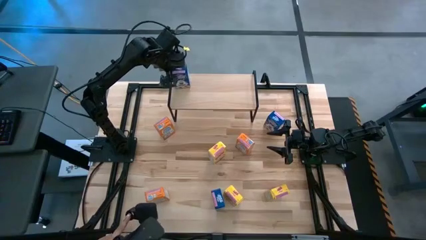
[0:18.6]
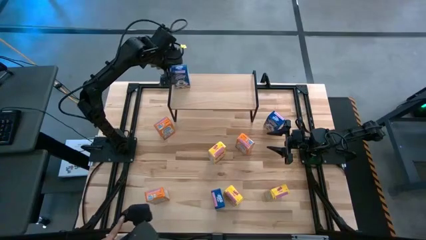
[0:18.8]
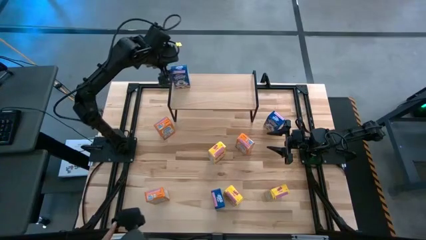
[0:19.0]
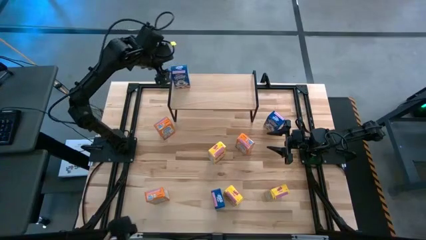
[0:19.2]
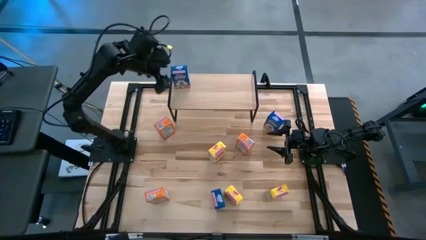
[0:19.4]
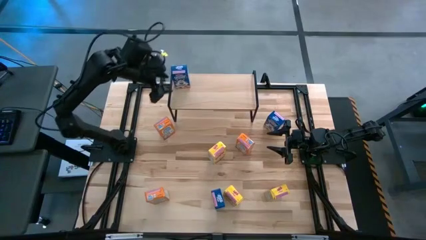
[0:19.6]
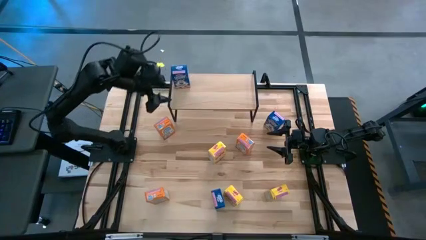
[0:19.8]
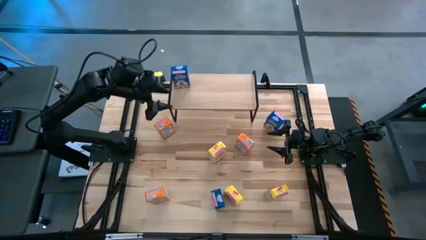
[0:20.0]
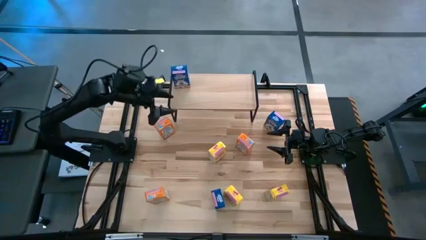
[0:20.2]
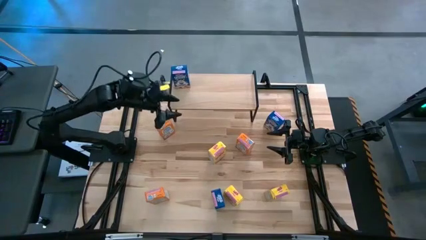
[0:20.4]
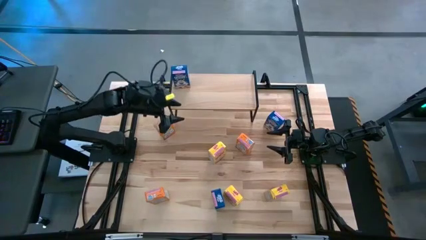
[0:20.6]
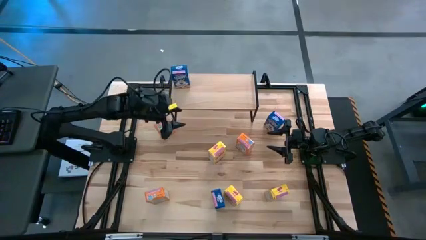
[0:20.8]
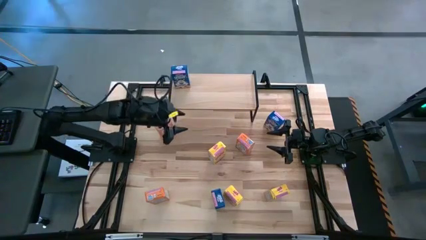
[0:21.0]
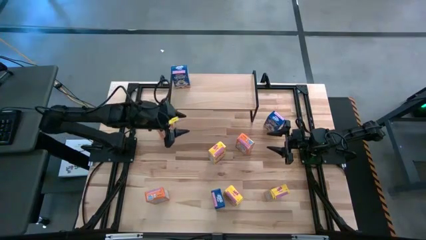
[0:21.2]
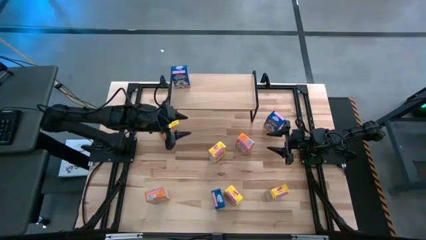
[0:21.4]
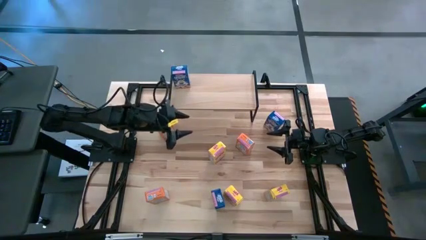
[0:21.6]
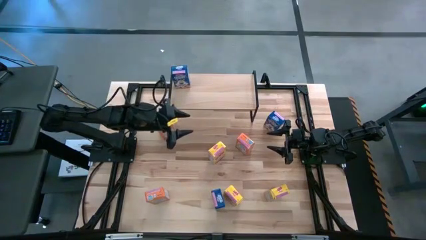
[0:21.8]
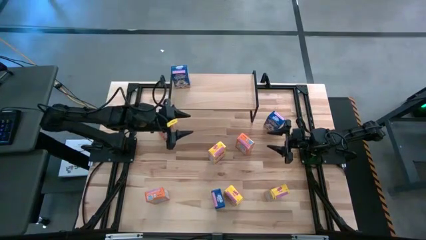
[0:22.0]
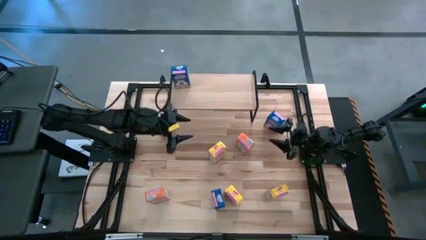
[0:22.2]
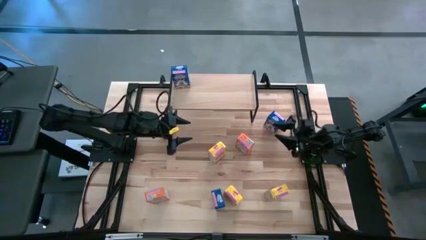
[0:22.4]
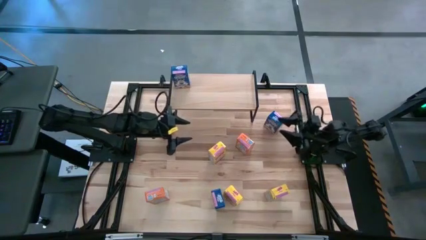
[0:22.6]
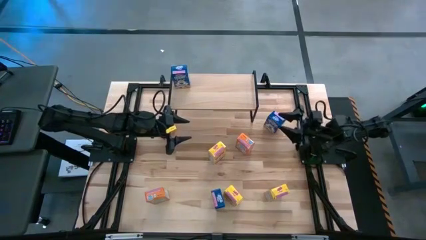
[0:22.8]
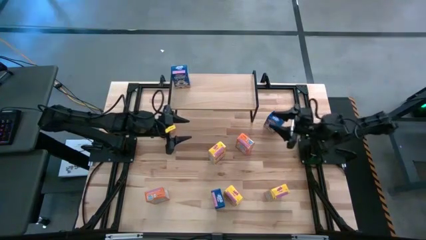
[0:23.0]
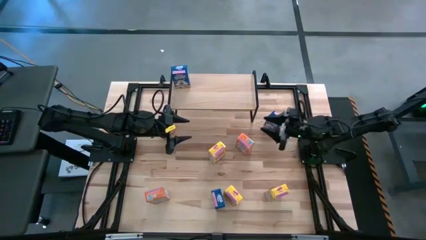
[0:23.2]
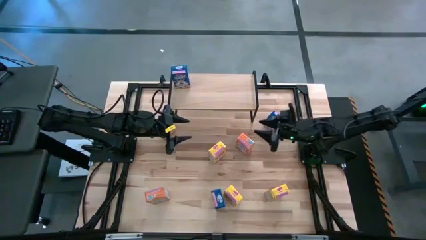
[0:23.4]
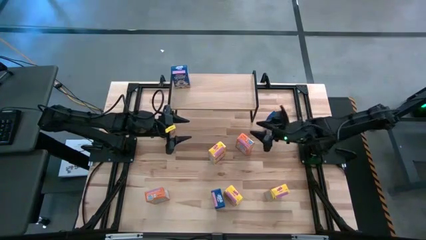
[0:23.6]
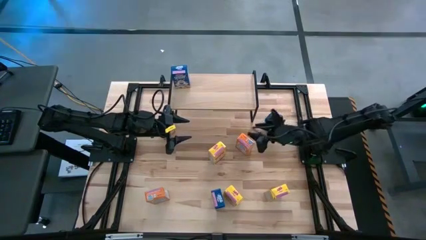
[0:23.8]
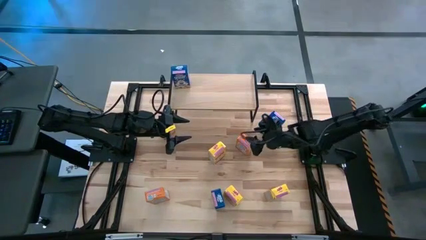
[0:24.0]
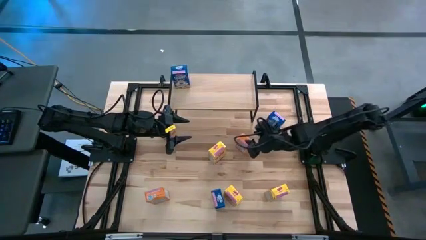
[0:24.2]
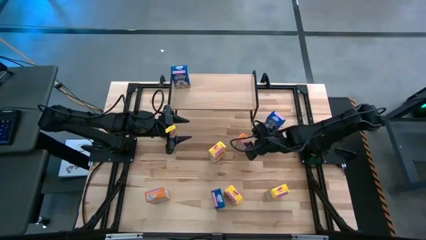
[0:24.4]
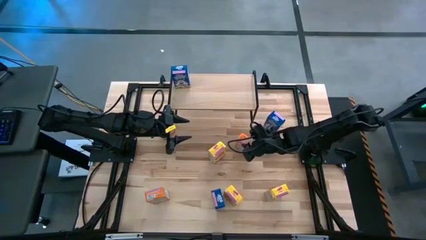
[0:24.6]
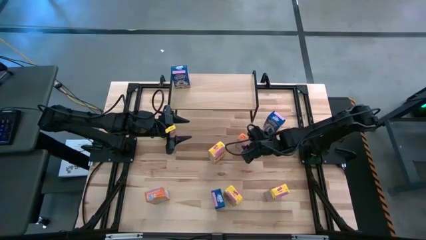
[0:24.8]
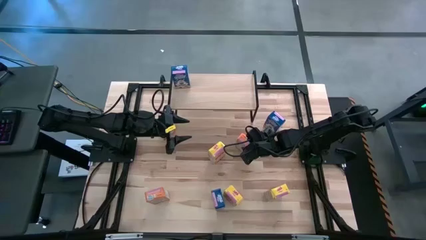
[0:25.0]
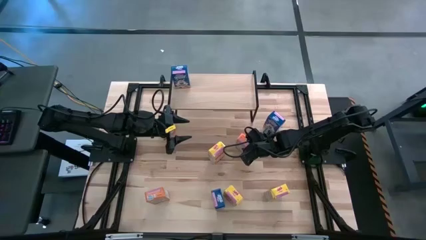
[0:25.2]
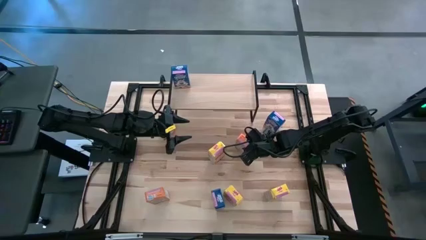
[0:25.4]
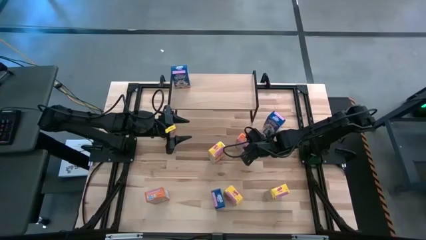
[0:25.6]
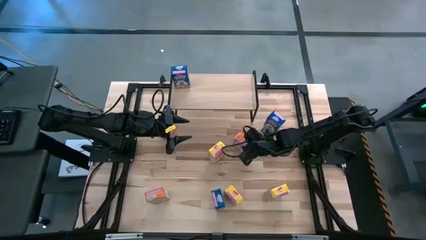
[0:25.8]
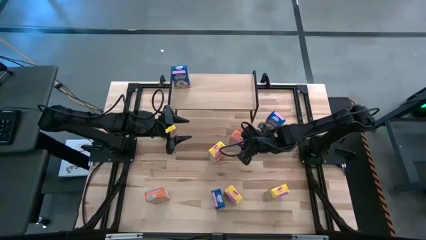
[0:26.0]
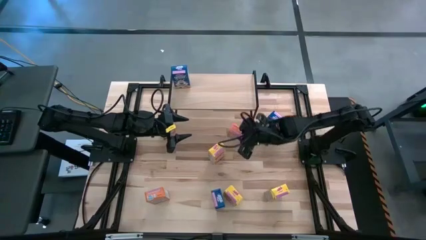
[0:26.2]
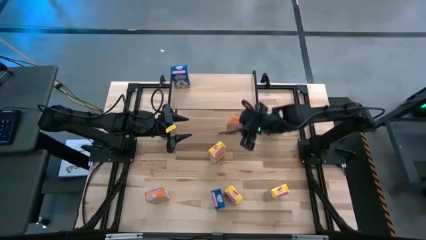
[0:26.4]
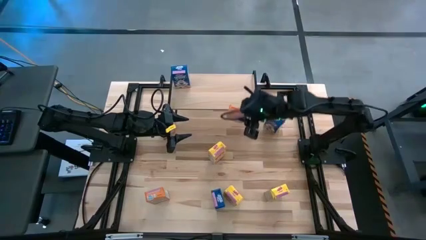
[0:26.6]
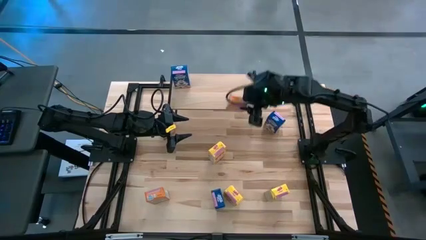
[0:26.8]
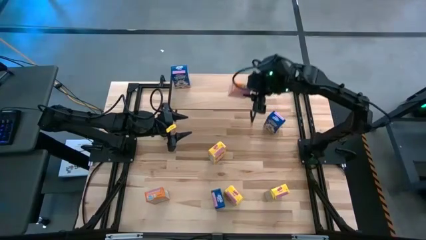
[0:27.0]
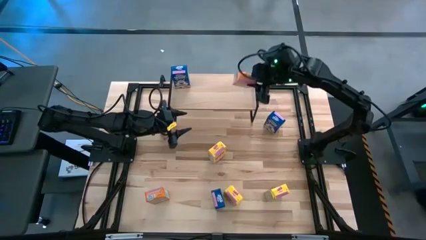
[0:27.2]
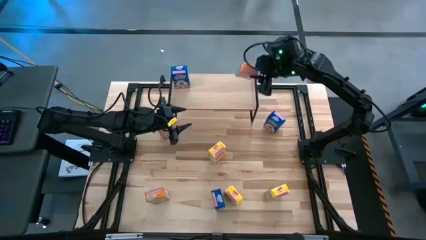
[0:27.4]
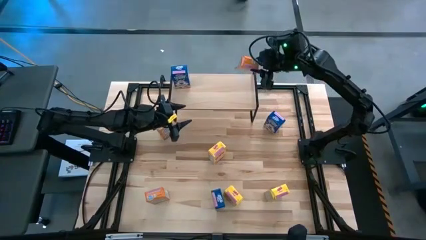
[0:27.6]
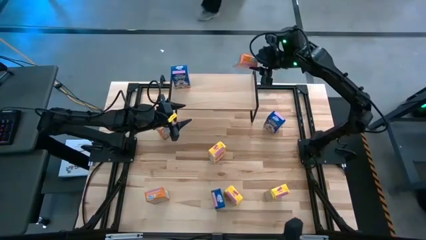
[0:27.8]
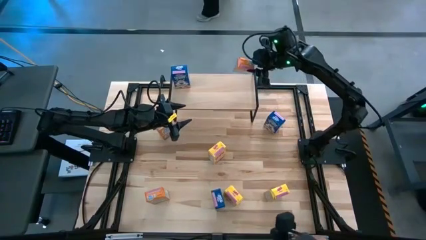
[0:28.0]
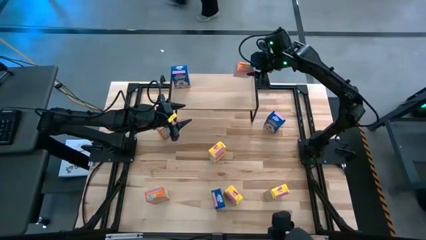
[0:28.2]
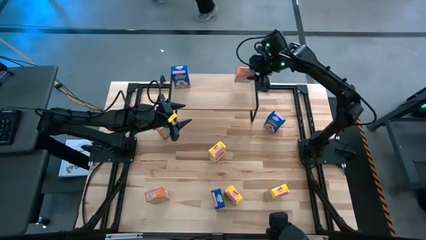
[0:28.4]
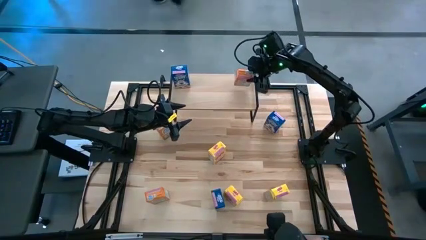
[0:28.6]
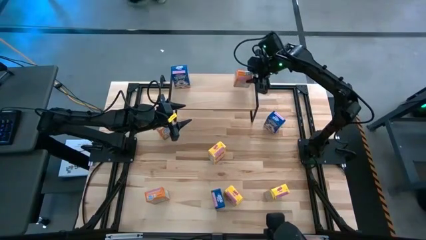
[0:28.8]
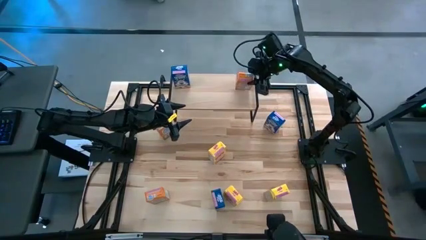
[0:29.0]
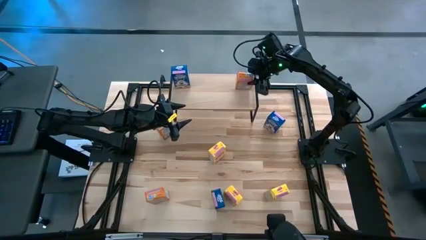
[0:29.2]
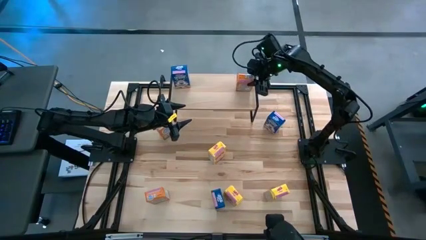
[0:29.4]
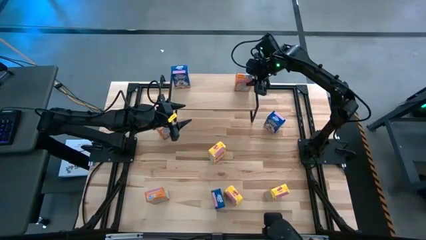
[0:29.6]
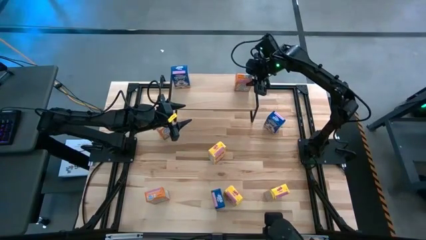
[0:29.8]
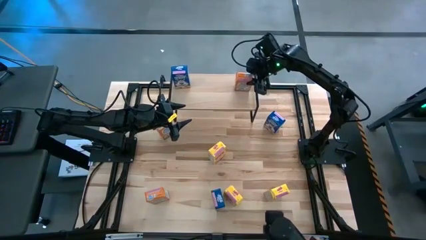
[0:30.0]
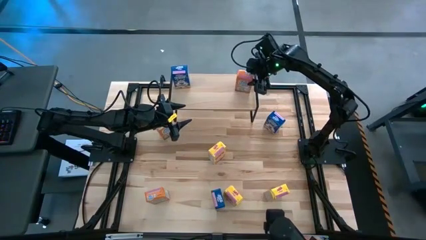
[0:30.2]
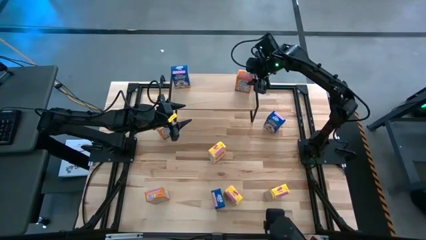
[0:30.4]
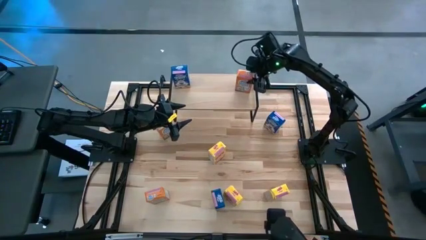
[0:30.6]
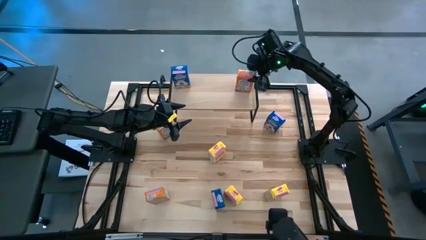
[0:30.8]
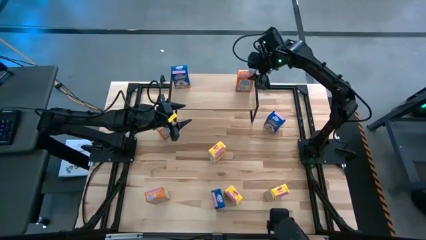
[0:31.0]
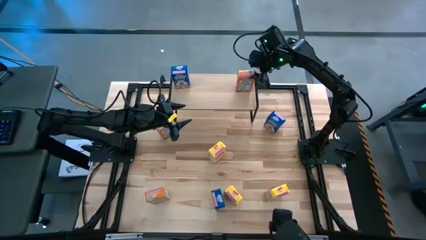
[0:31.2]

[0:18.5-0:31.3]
Task: Stack cereal on shelf
Put the top right orange cereal box on the shelf
